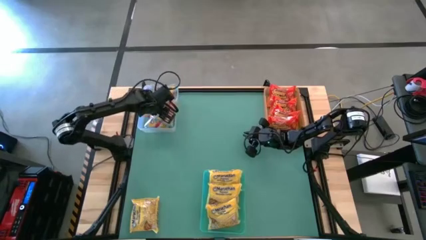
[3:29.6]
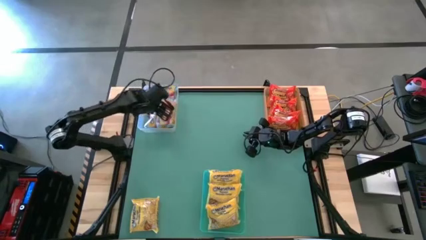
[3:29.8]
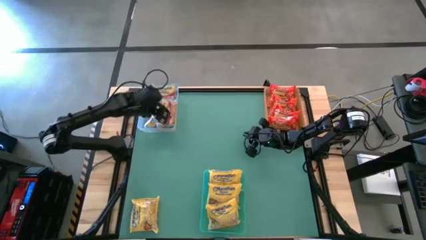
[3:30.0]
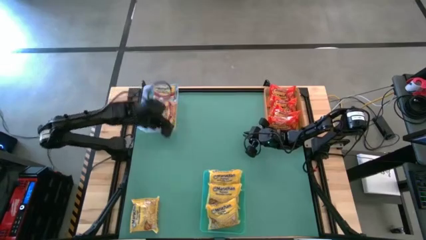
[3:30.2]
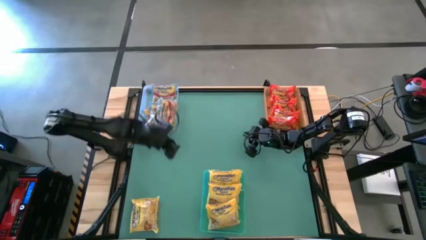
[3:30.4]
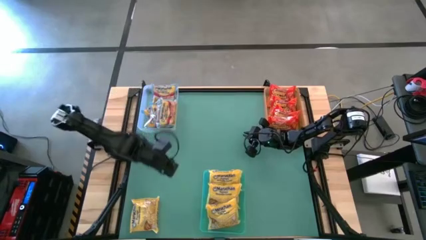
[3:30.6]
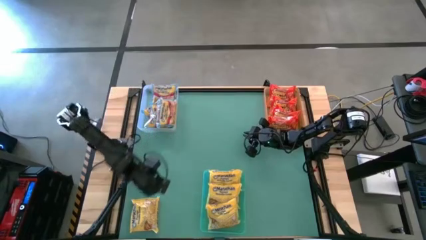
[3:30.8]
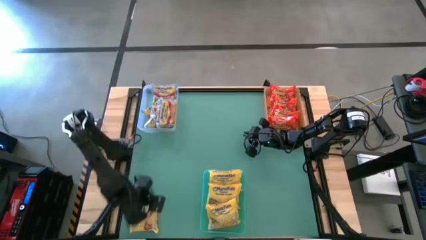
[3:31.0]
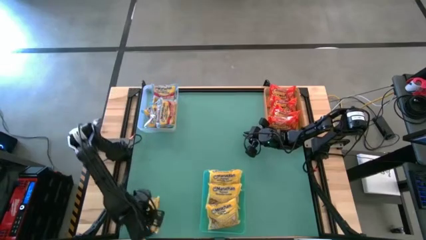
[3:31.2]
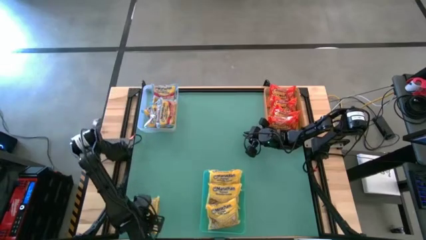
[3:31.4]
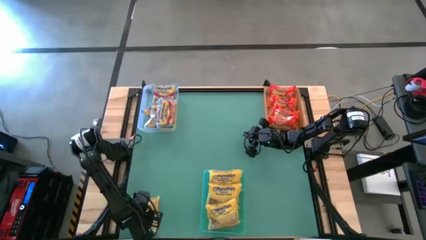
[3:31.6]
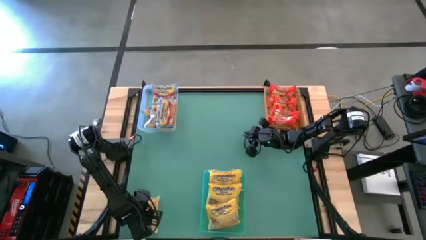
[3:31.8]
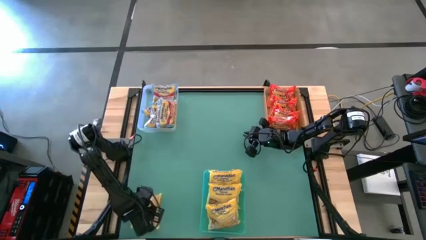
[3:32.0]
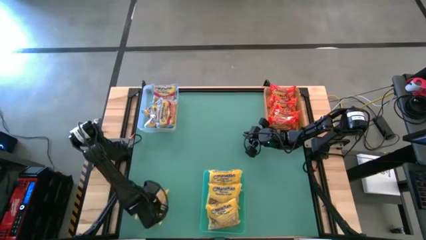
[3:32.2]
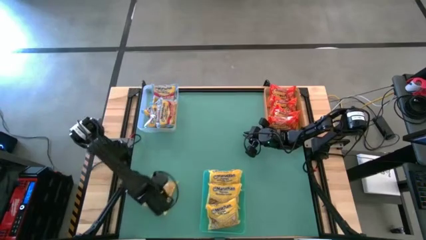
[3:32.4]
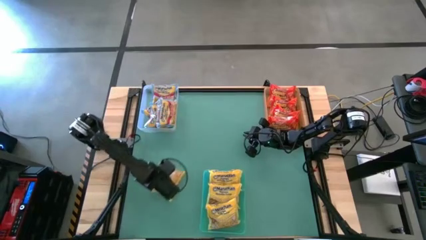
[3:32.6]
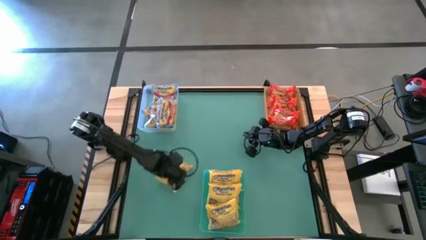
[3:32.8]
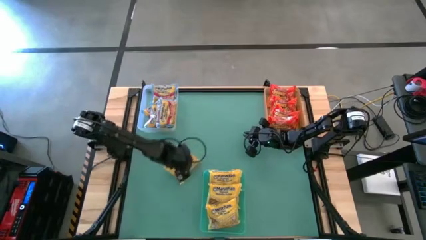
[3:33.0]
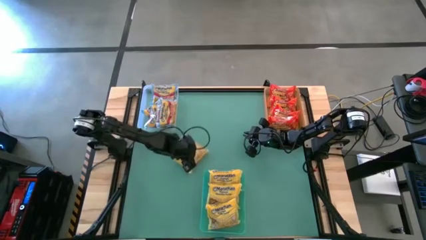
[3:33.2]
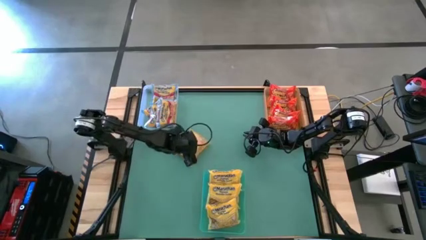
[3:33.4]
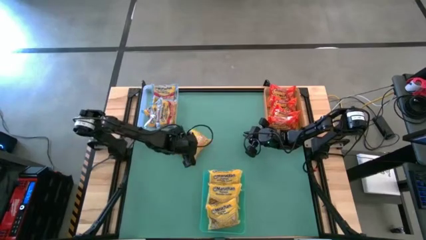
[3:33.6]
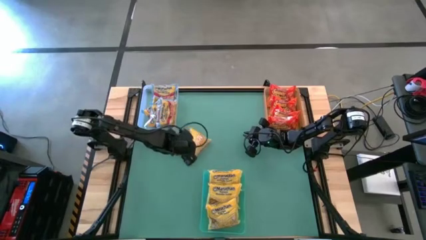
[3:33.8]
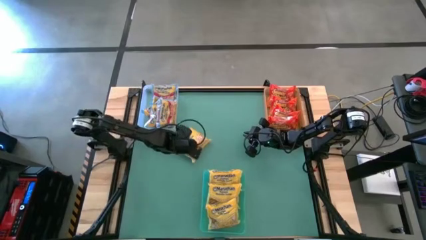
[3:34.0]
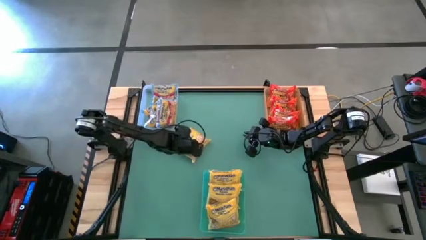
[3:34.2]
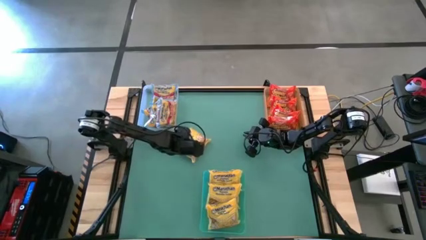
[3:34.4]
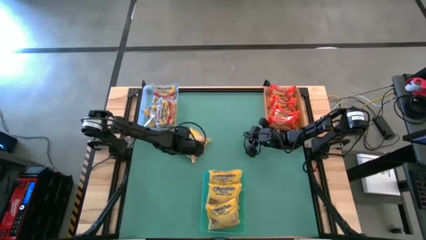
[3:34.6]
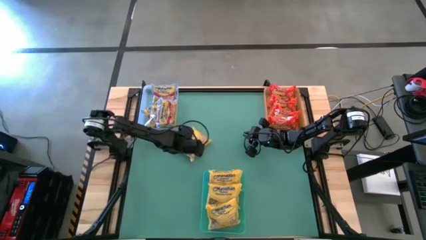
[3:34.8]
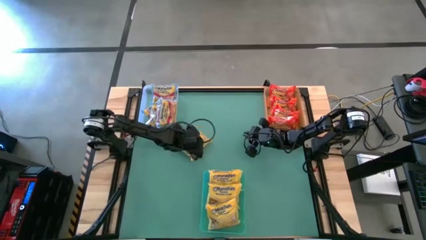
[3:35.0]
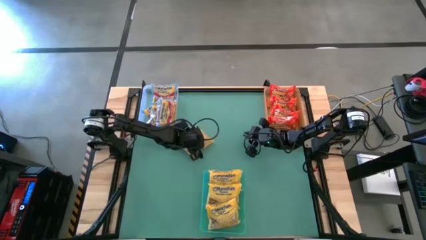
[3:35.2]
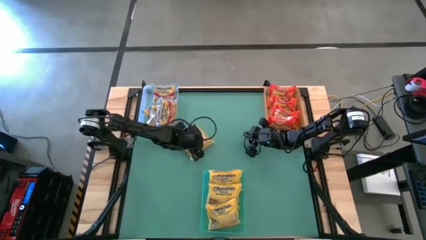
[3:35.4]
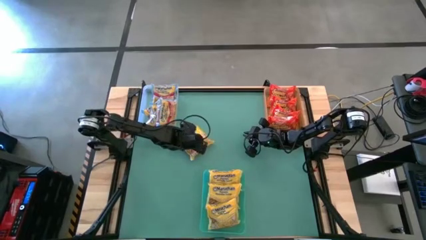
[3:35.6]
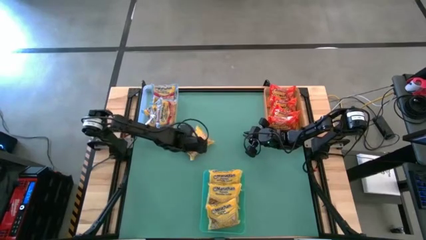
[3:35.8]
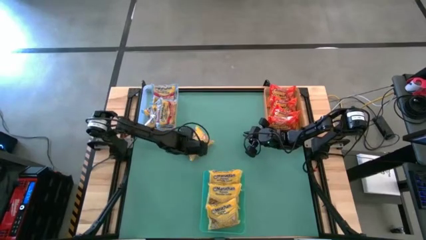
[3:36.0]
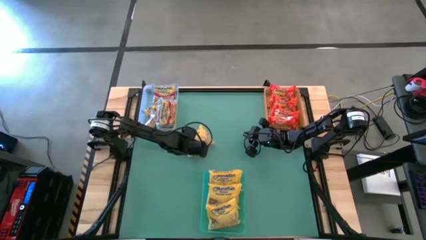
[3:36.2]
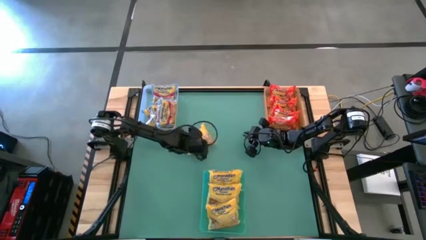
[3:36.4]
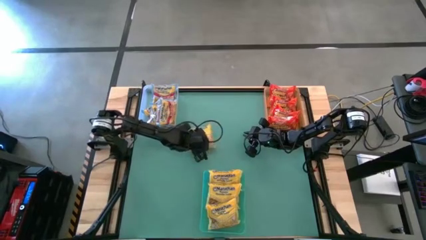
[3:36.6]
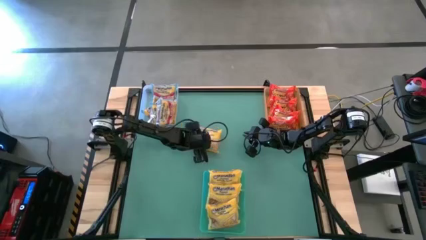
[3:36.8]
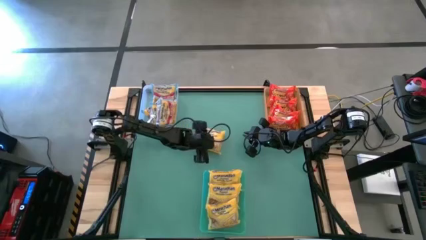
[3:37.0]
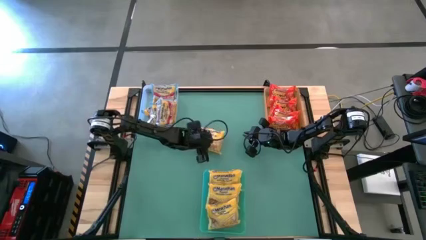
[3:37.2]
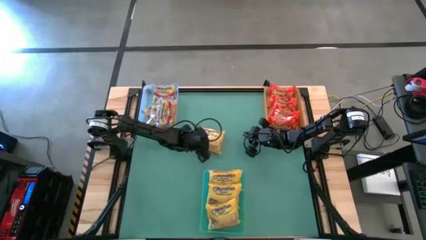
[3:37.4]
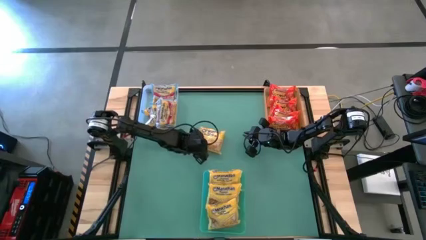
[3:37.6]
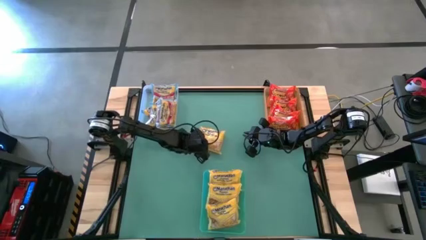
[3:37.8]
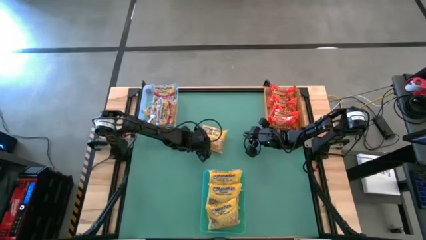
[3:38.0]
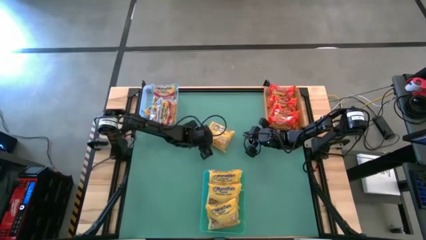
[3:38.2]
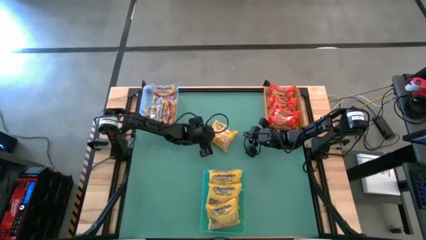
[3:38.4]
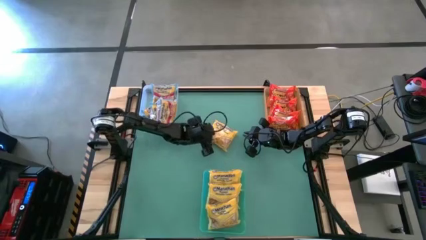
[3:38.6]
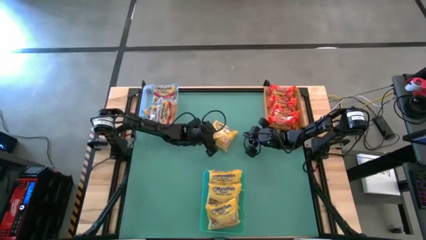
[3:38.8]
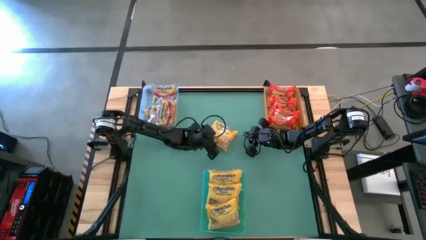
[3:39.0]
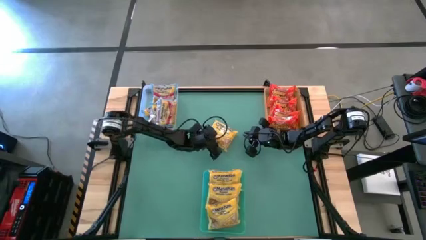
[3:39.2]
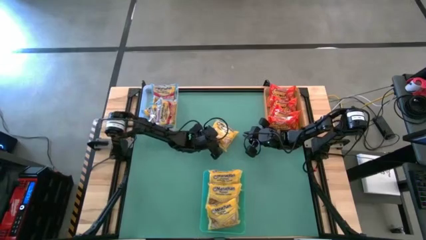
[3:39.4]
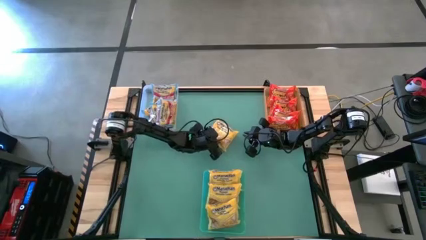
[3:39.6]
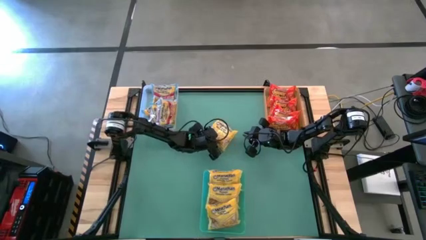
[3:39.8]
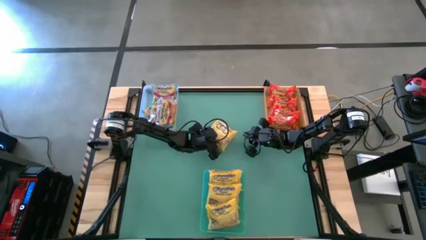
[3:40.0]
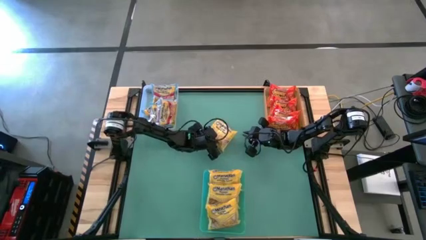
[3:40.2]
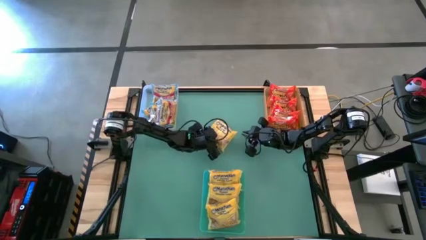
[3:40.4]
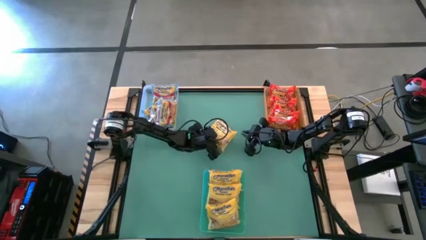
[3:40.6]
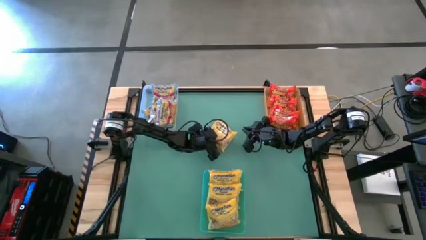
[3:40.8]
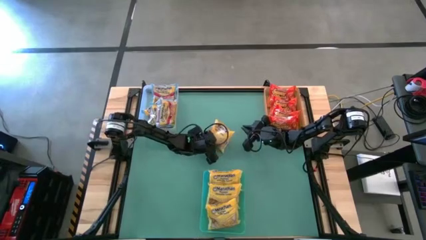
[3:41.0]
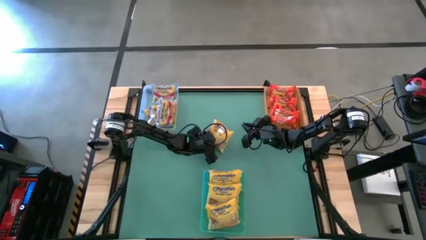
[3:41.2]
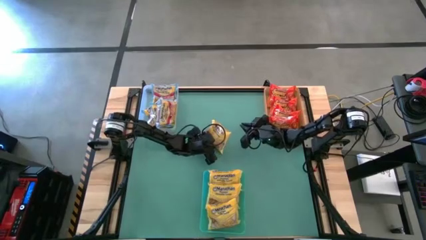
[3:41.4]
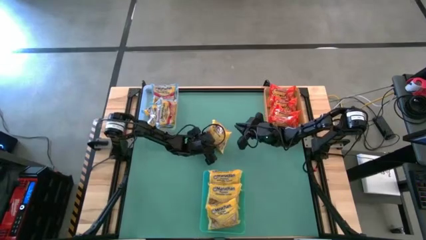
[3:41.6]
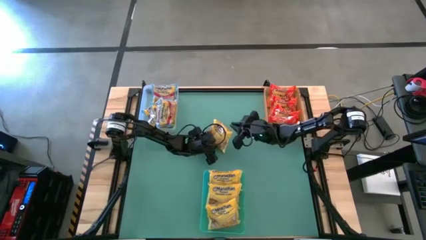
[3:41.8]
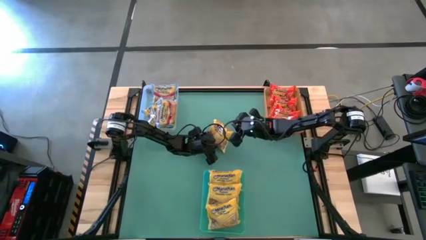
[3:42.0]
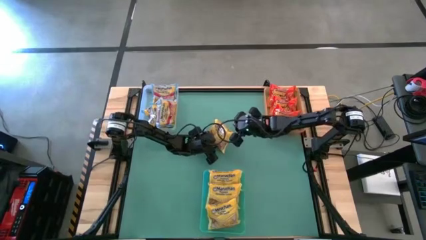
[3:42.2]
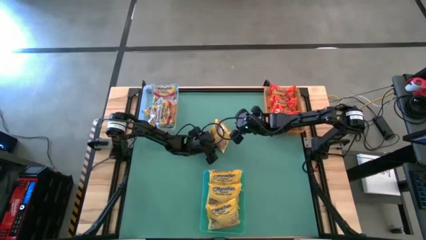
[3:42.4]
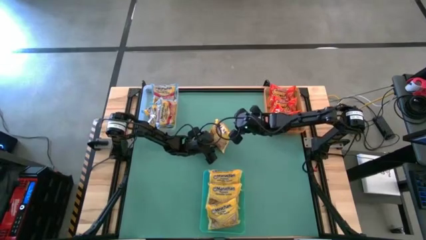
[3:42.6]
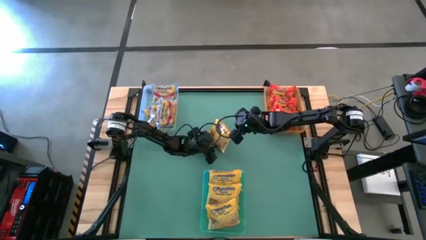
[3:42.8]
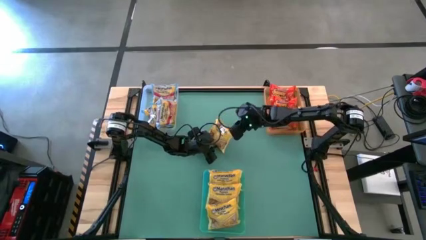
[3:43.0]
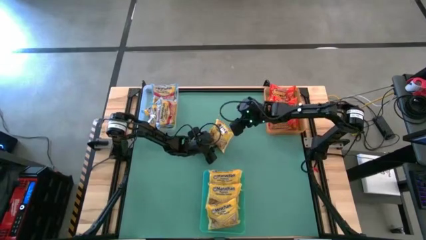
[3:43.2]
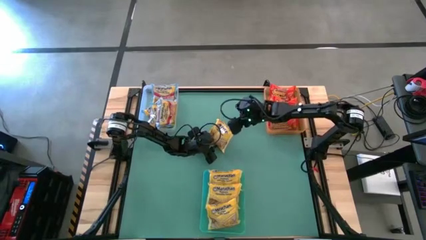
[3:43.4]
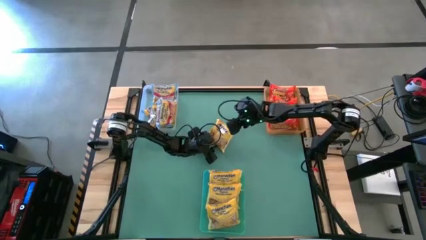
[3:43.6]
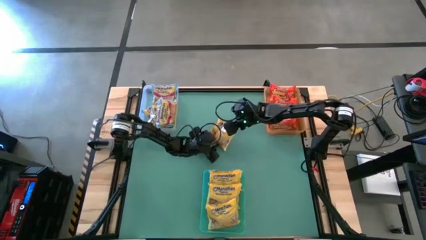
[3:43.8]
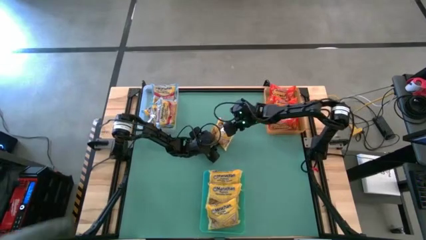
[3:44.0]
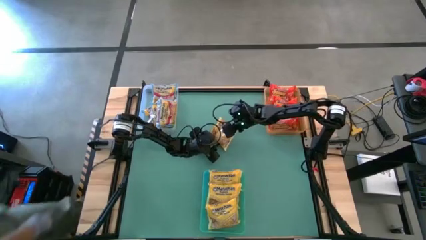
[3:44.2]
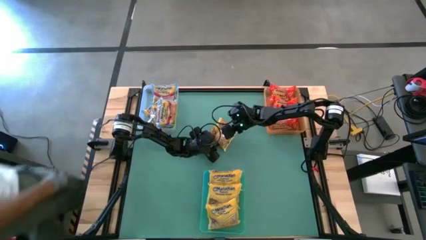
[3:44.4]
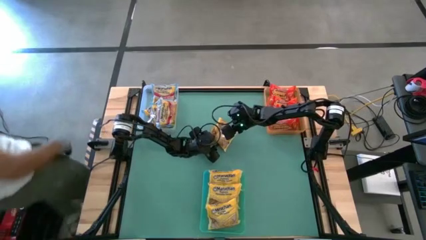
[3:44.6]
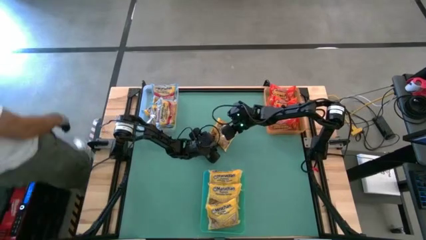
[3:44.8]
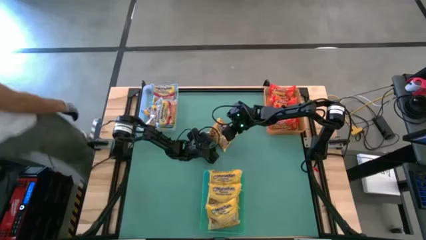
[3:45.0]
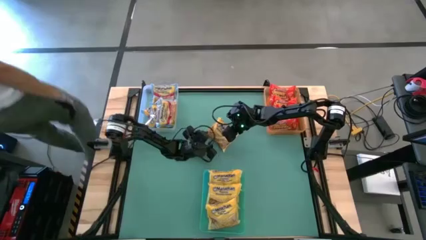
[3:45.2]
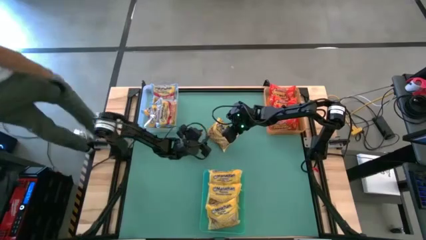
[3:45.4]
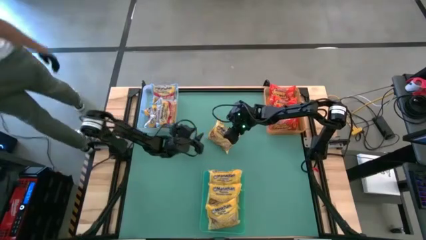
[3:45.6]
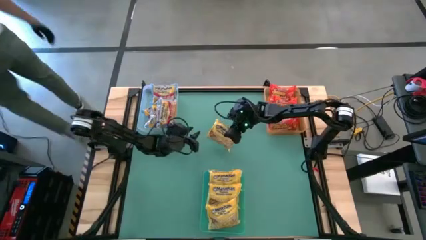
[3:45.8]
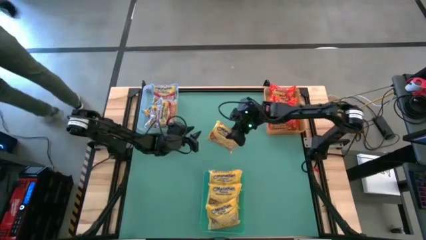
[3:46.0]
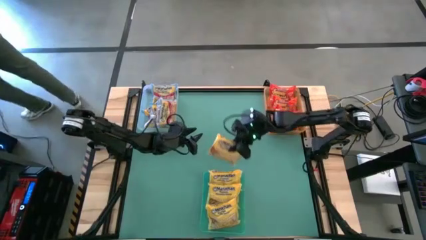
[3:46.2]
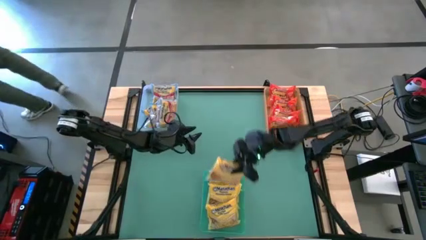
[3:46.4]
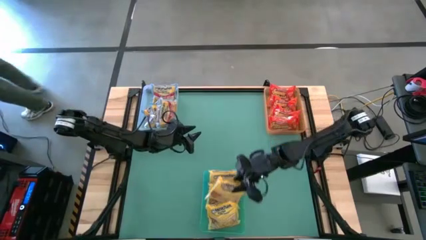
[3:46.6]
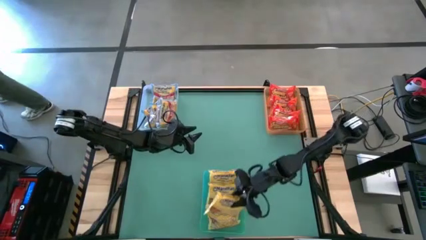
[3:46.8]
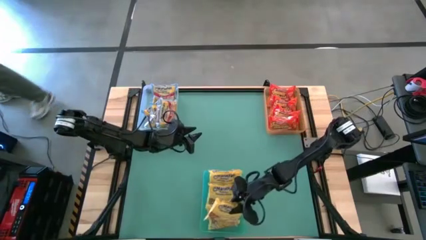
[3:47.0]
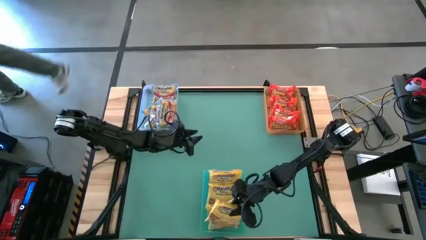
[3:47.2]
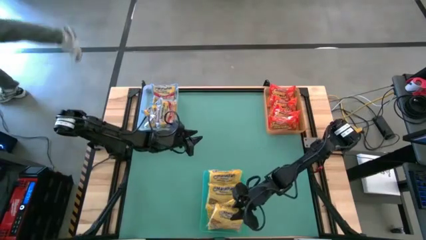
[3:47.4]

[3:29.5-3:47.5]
Task: Sort Maruchan noodles
Put the yellow noodle pack into the green bin
